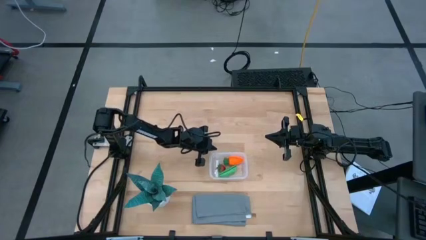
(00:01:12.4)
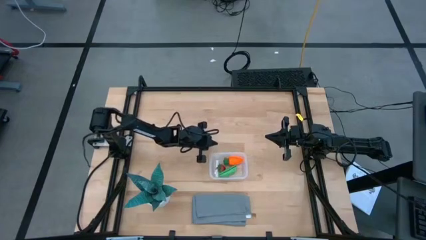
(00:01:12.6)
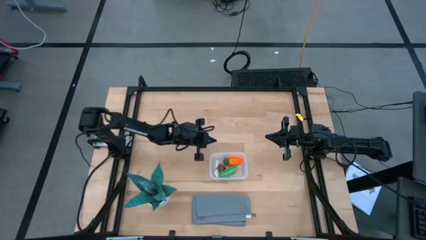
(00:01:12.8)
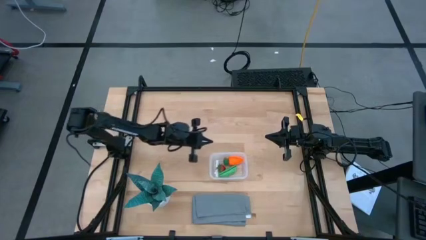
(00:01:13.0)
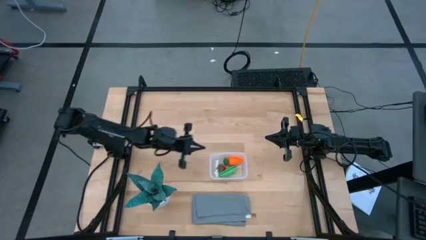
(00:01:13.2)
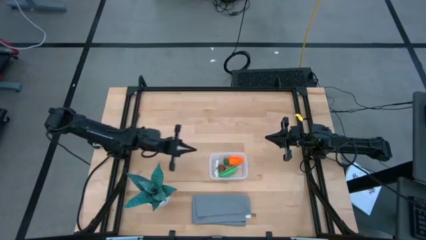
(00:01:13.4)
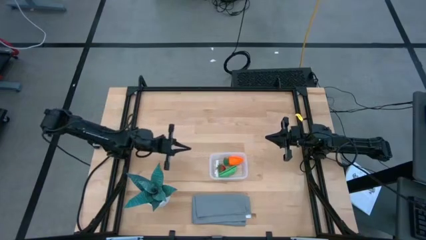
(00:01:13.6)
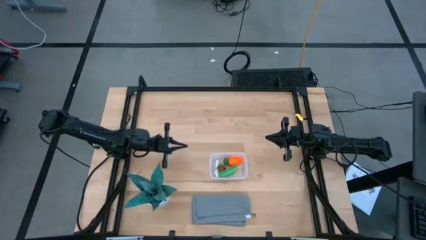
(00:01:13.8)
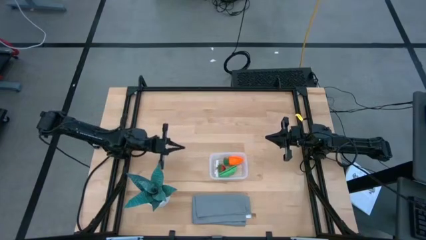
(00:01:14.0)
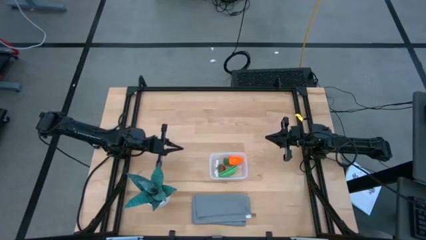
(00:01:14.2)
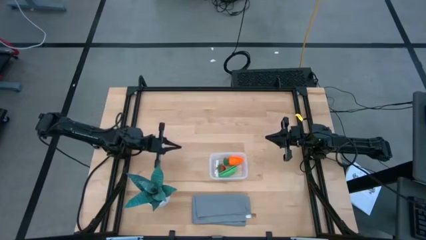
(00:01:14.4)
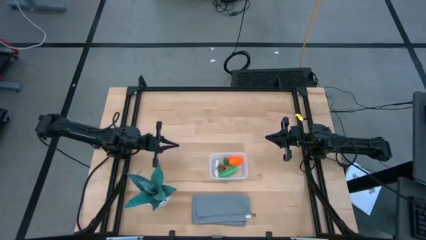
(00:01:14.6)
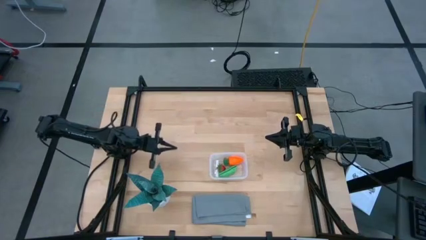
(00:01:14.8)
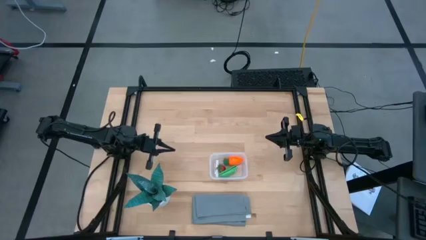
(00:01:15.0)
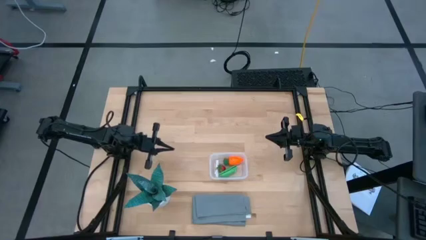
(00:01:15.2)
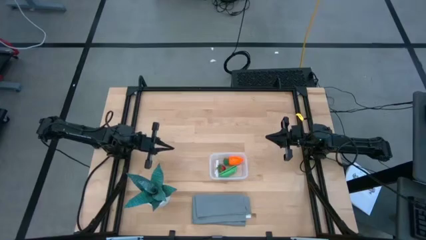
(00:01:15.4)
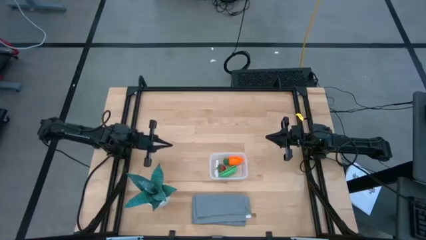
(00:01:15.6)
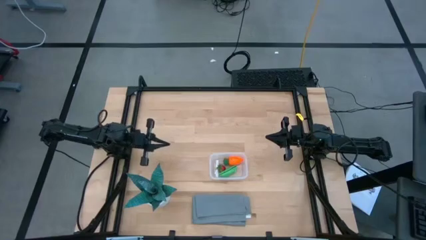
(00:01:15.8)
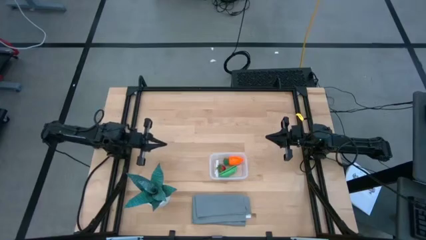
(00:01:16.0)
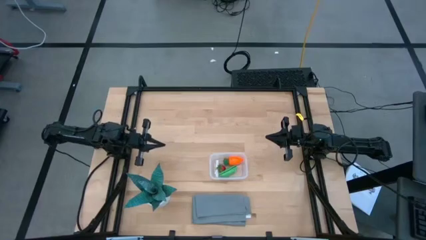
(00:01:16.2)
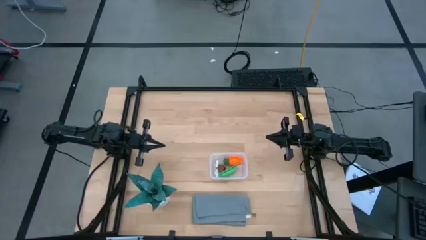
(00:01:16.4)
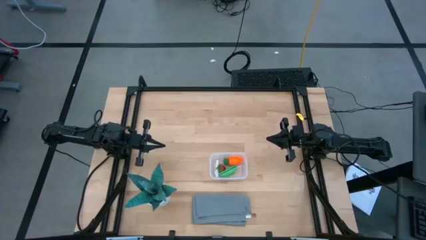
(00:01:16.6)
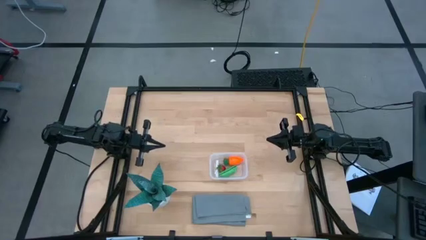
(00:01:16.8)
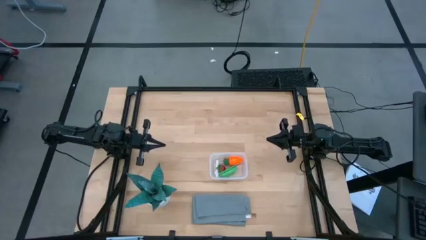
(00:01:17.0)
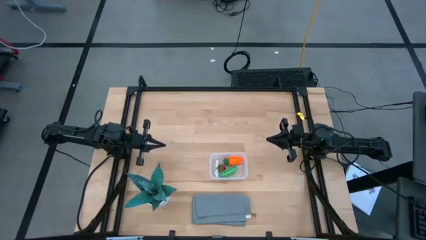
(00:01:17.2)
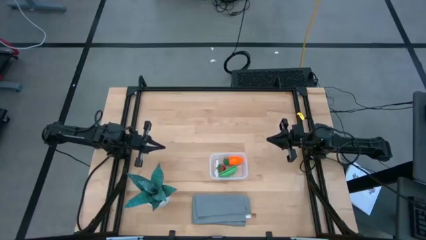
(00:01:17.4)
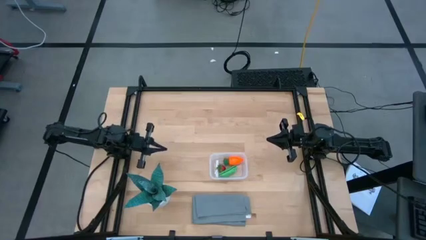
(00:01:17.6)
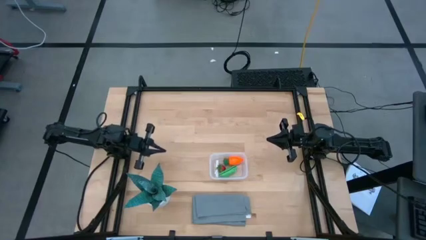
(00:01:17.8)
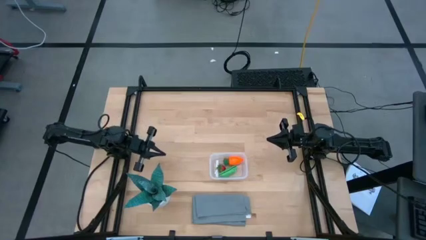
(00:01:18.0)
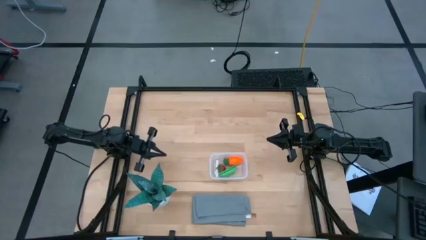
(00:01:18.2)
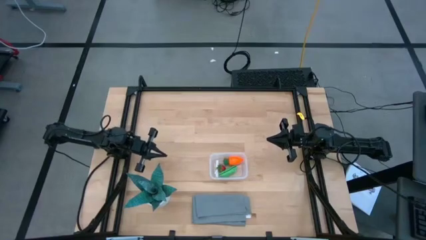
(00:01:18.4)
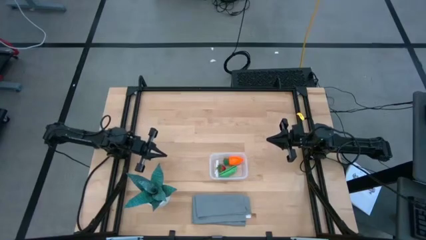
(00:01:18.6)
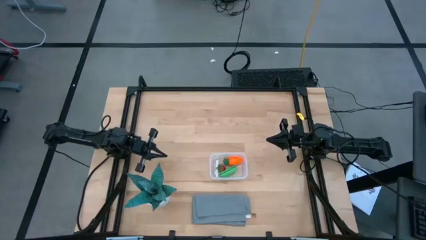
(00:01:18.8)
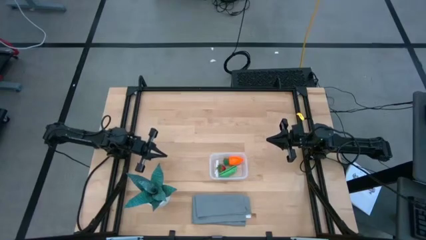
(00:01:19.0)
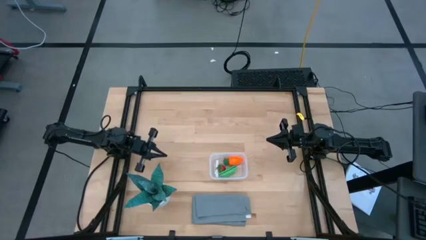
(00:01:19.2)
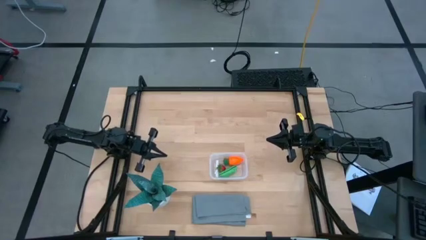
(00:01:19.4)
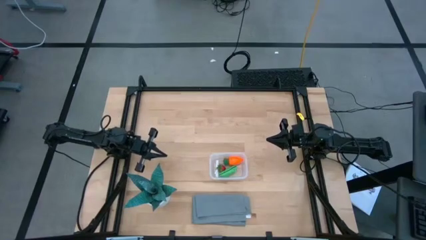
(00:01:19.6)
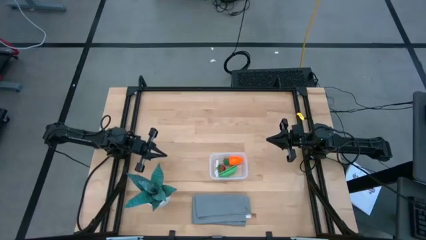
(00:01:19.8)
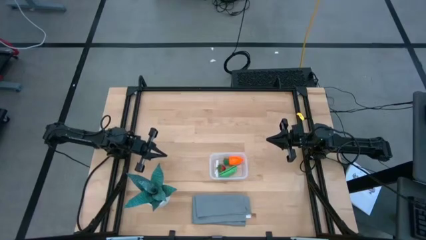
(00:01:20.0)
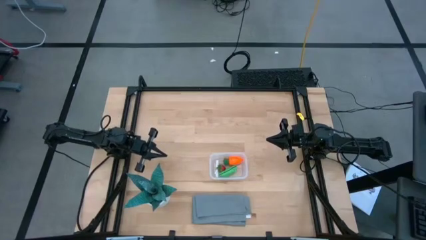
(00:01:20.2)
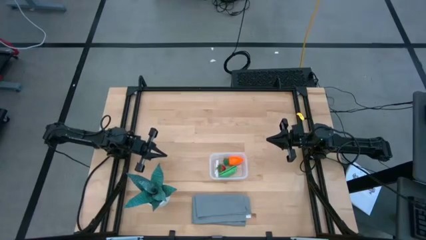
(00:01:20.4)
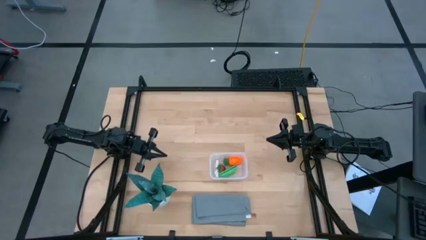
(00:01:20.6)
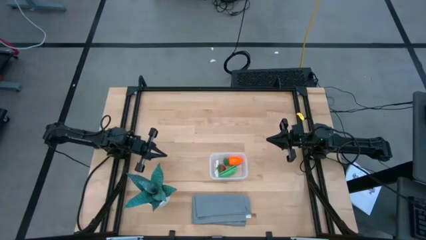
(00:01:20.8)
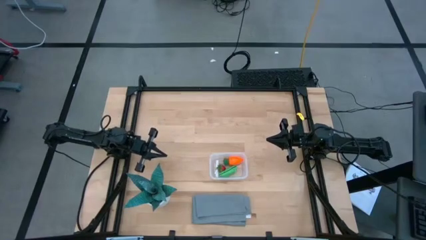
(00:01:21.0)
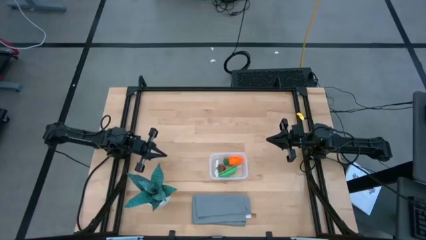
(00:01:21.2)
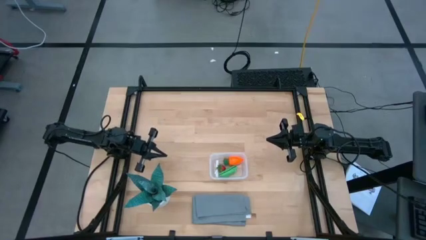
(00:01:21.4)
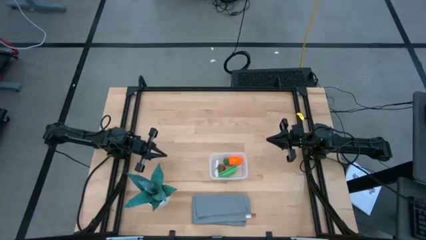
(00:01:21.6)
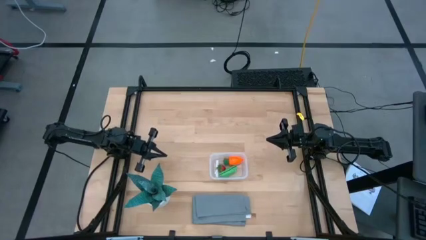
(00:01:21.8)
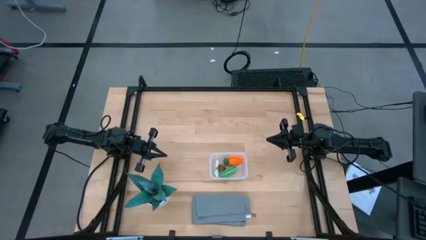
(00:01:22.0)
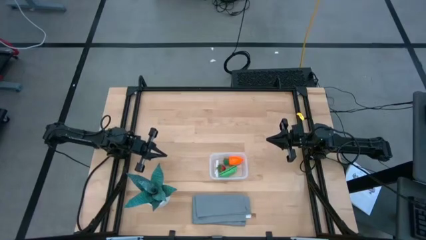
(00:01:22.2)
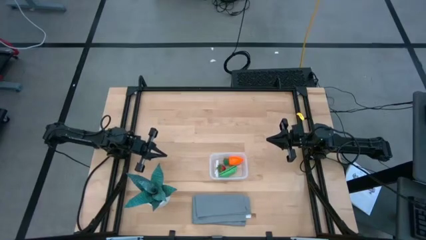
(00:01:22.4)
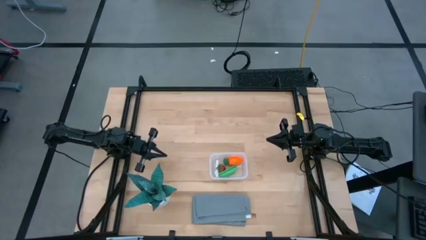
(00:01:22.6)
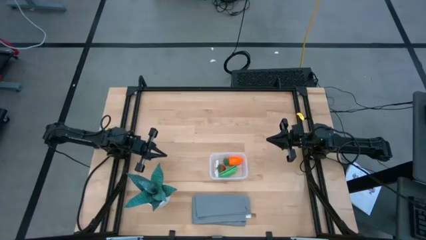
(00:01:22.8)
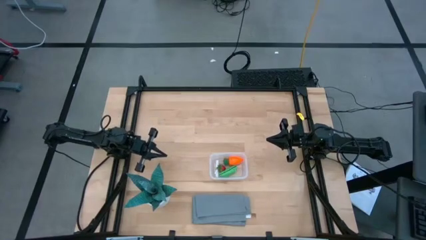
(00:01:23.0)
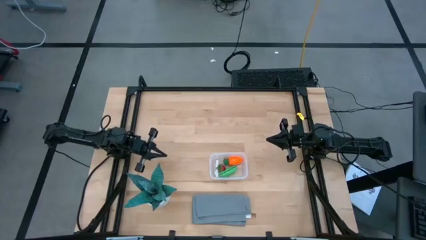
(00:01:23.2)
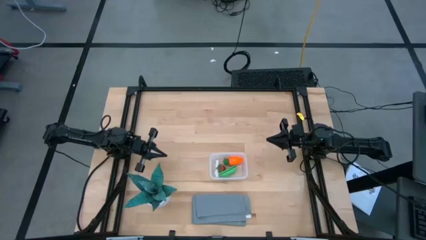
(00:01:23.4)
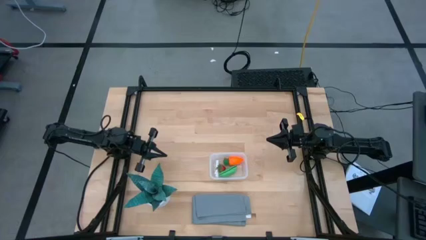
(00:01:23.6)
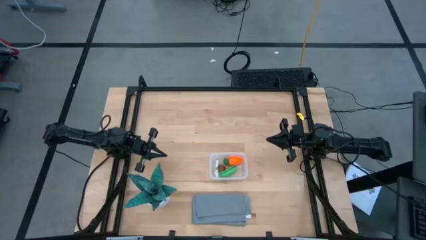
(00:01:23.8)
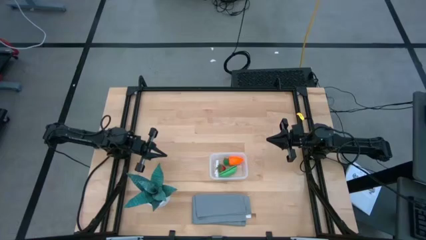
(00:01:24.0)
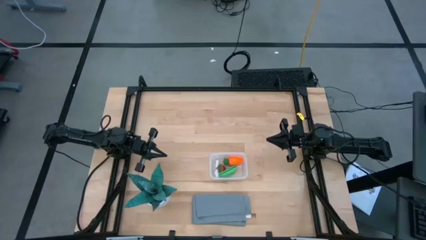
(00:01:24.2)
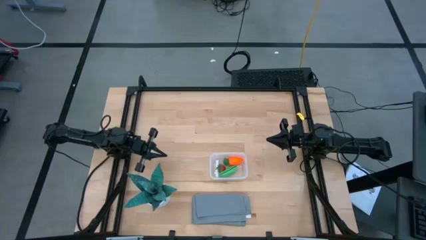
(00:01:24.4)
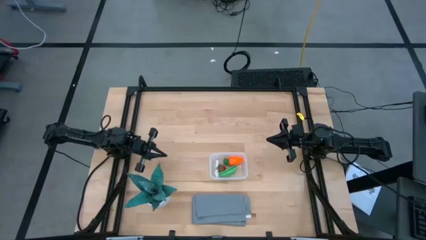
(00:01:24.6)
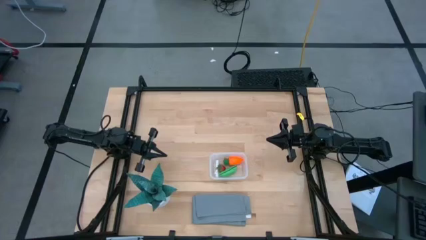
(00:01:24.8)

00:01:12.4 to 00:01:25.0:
Task: Pick and placing Produce into tupperware
Return to Home Position

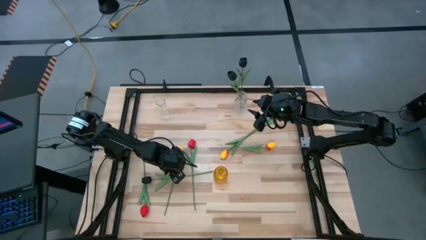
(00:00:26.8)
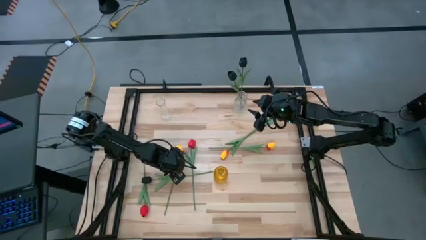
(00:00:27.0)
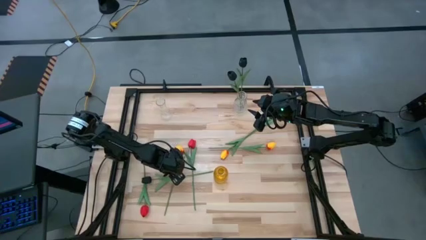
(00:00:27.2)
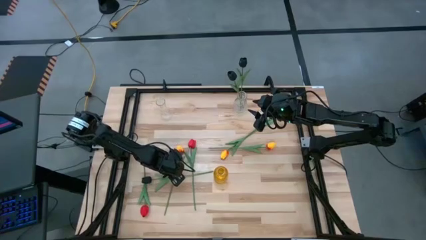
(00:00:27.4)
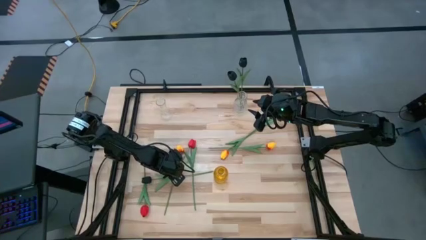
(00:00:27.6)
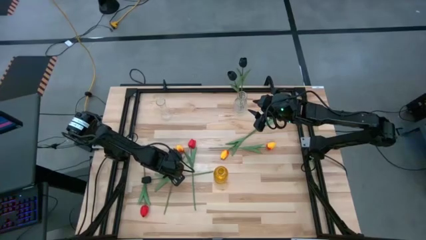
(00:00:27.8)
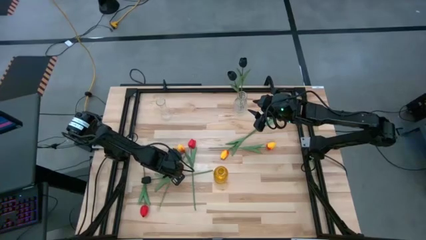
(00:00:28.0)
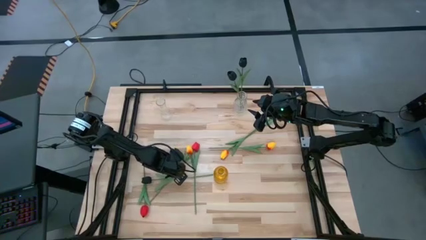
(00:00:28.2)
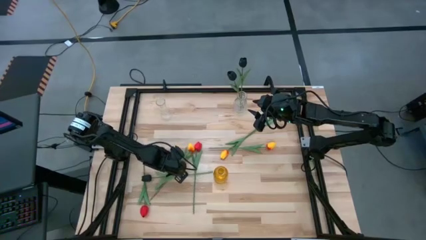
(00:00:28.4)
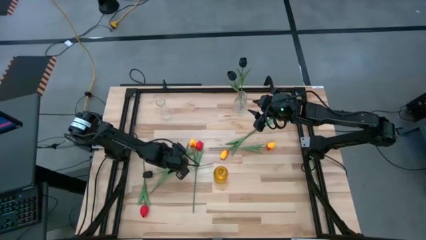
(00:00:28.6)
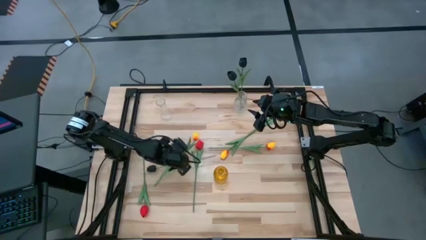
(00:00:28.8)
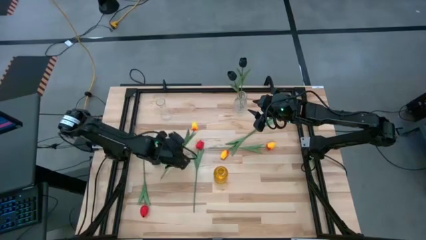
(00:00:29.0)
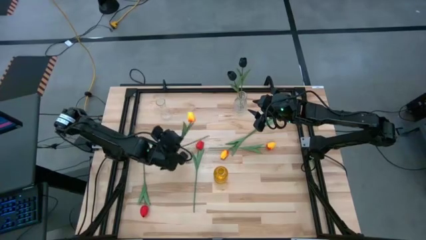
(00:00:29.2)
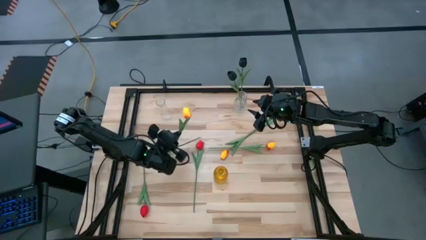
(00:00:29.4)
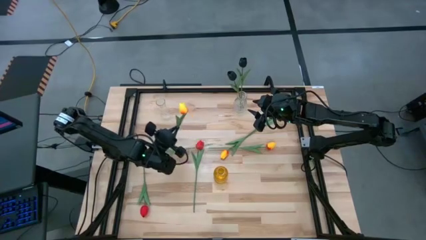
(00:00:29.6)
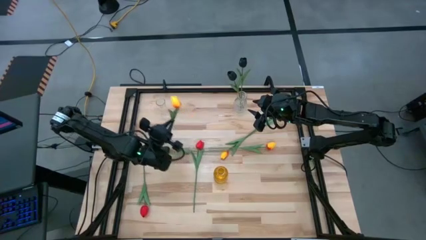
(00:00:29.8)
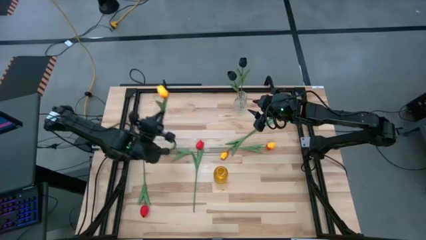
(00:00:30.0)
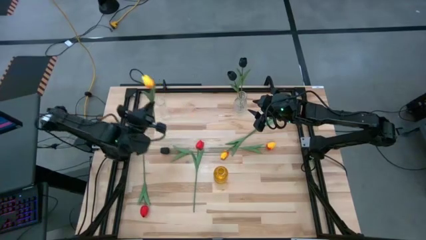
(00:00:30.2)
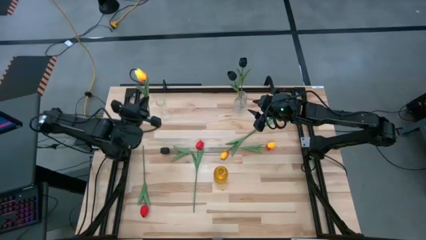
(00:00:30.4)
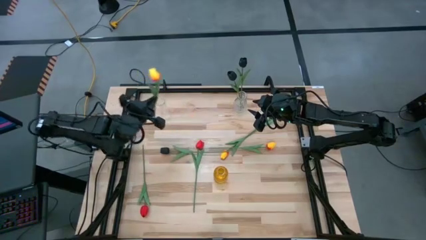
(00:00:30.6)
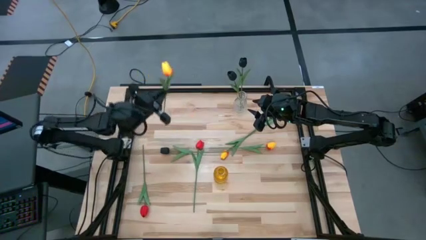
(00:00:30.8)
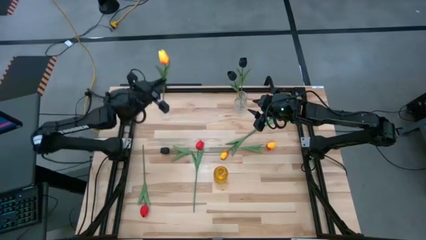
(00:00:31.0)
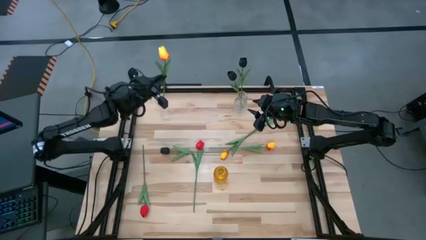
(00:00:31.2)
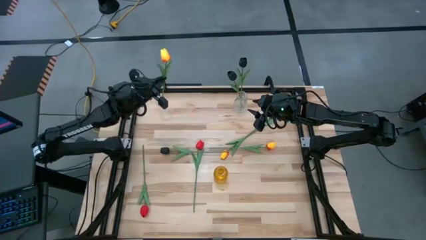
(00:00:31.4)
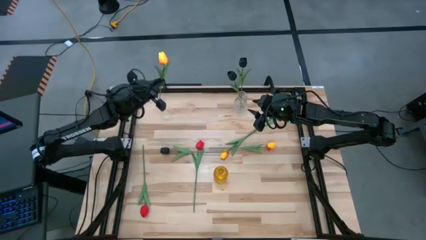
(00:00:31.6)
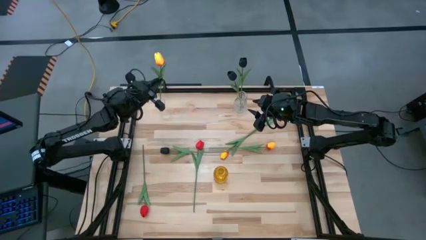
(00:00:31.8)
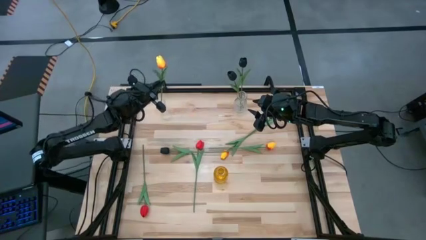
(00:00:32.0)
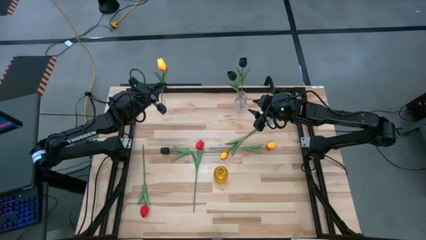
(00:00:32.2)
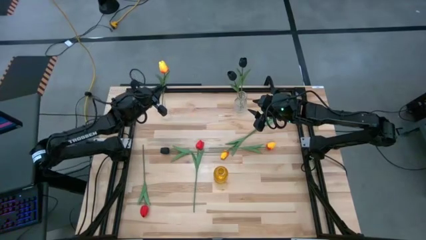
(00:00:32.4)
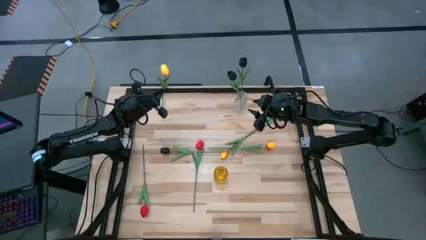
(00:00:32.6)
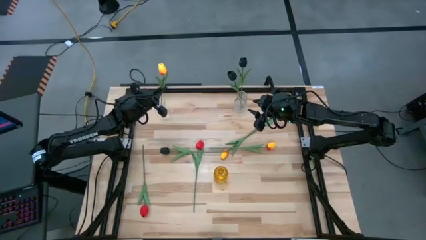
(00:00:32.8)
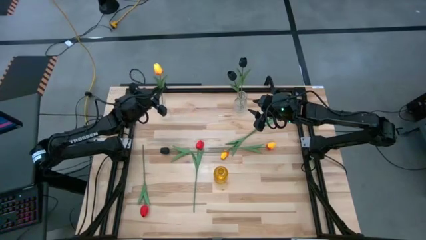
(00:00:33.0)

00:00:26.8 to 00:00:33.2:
Task: Sort flowers into vase by color
Put the left yellow flower into the left transparent vase
